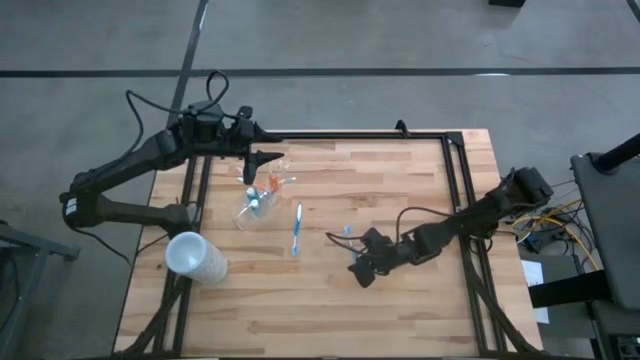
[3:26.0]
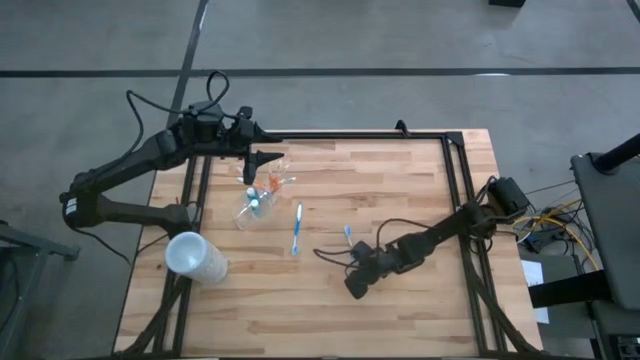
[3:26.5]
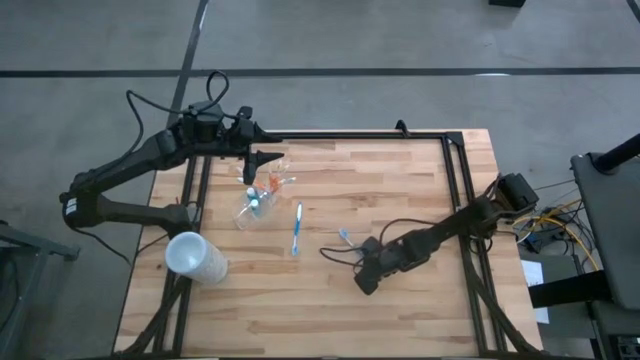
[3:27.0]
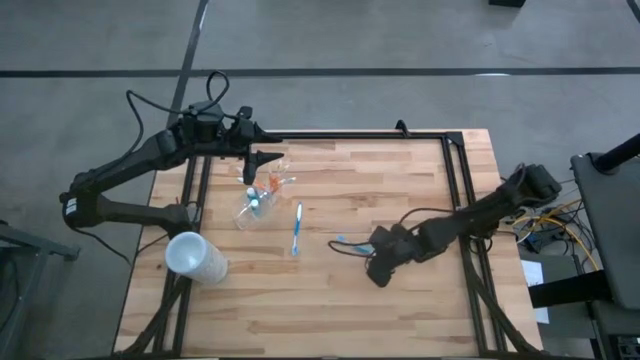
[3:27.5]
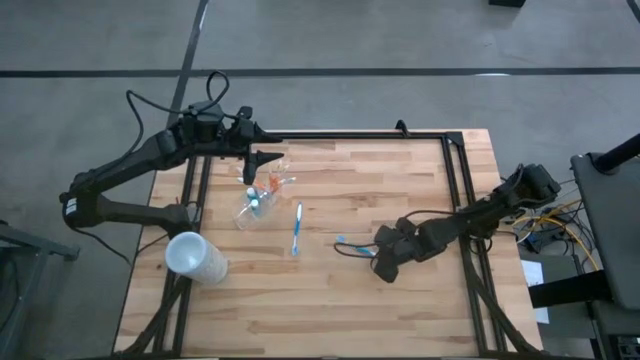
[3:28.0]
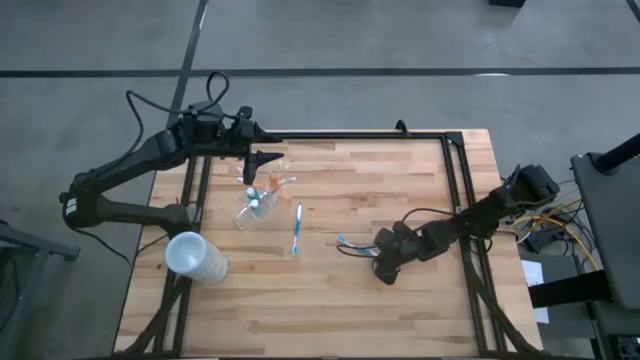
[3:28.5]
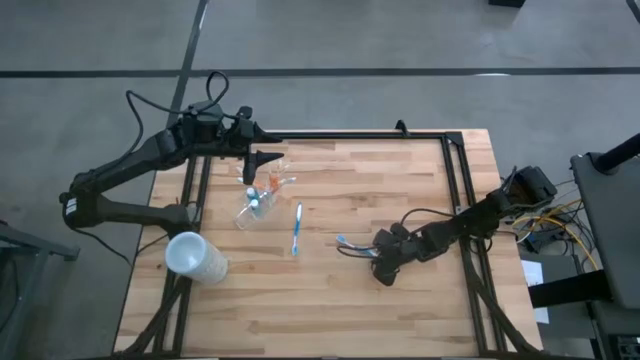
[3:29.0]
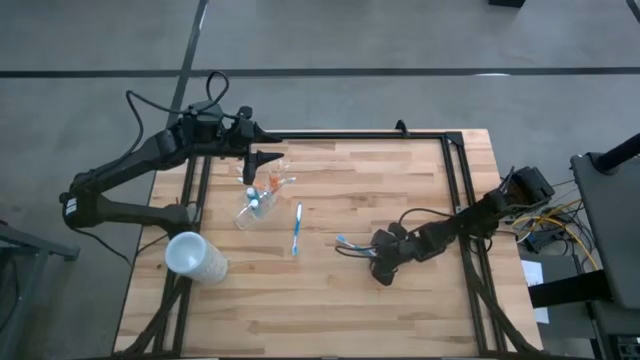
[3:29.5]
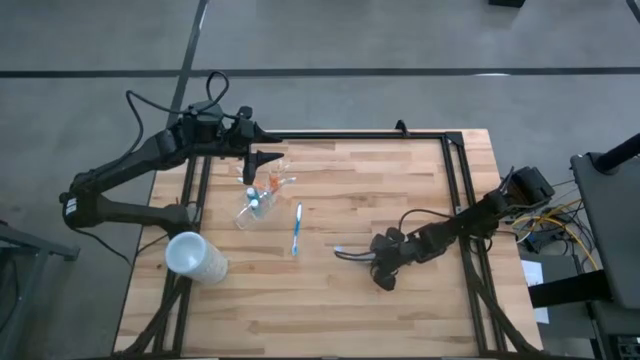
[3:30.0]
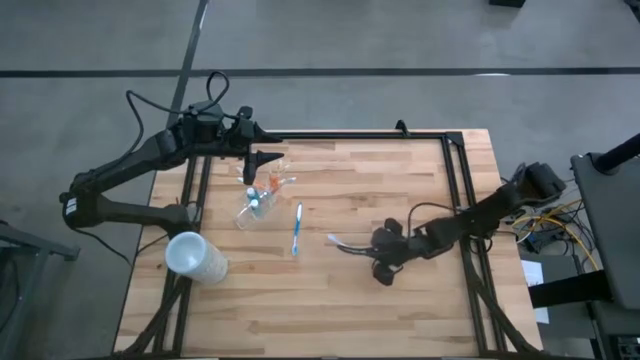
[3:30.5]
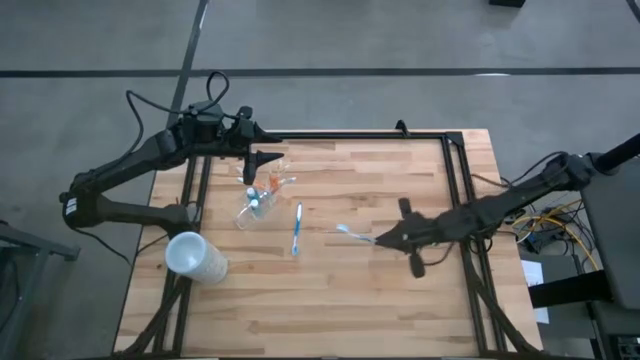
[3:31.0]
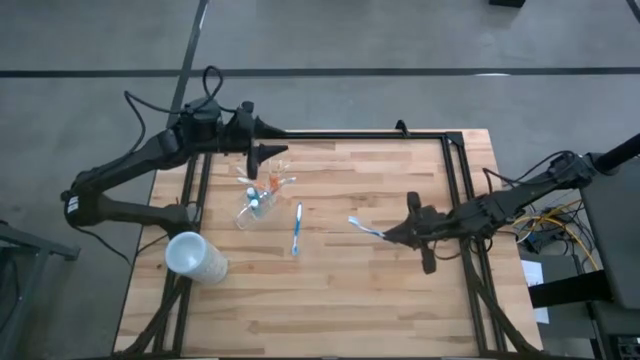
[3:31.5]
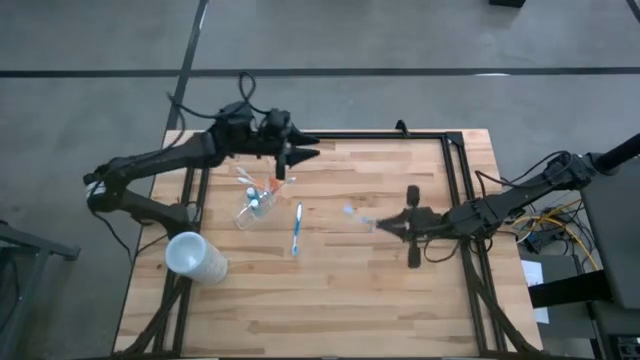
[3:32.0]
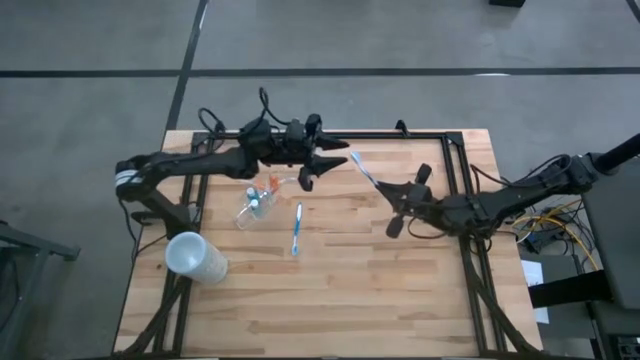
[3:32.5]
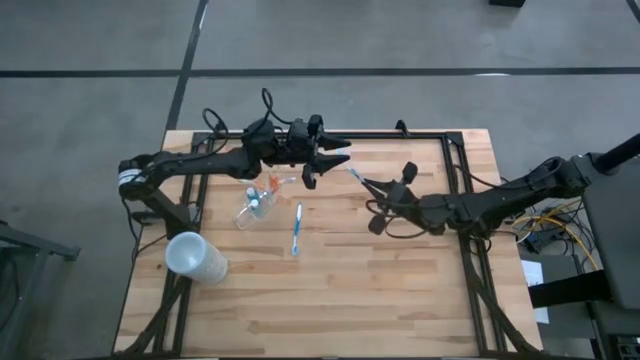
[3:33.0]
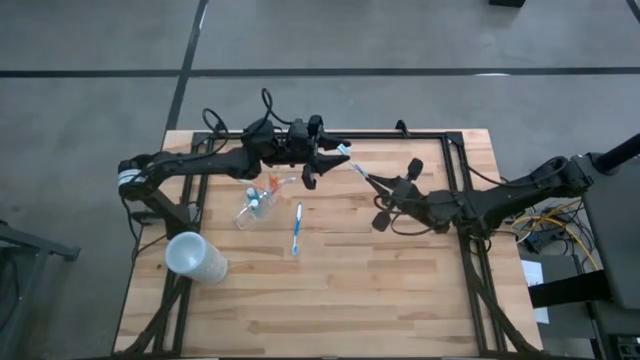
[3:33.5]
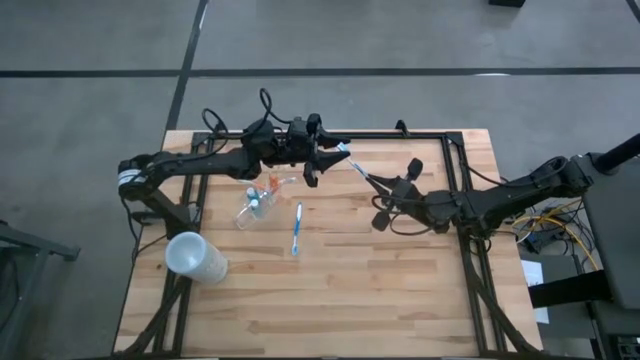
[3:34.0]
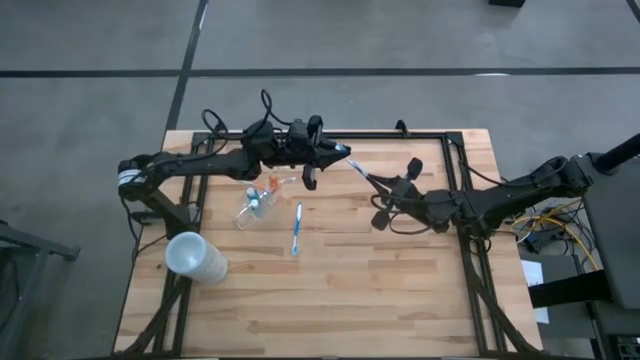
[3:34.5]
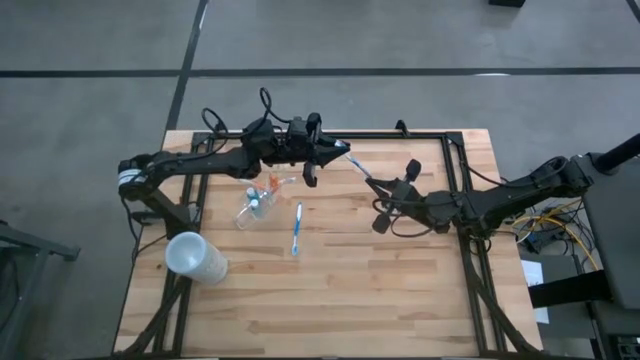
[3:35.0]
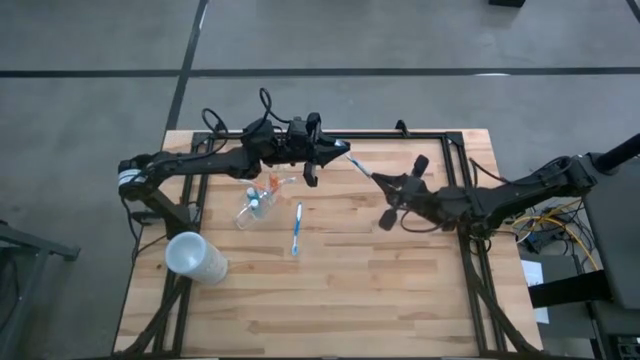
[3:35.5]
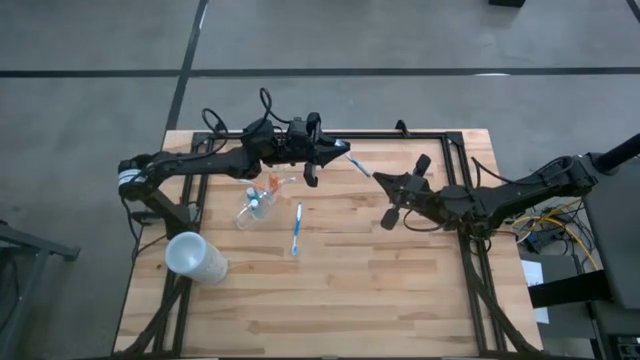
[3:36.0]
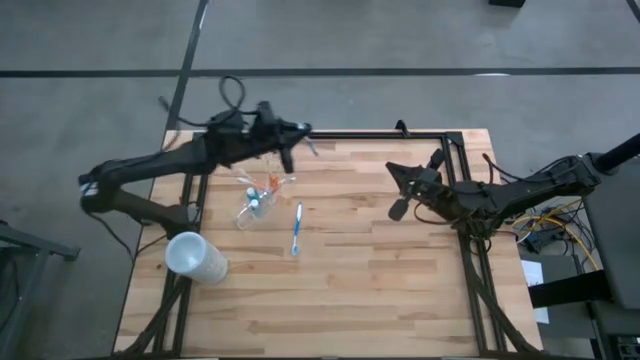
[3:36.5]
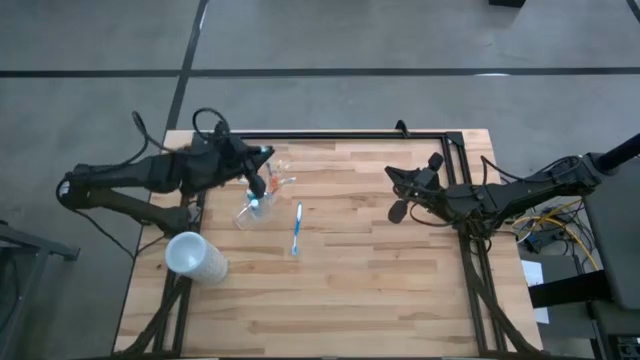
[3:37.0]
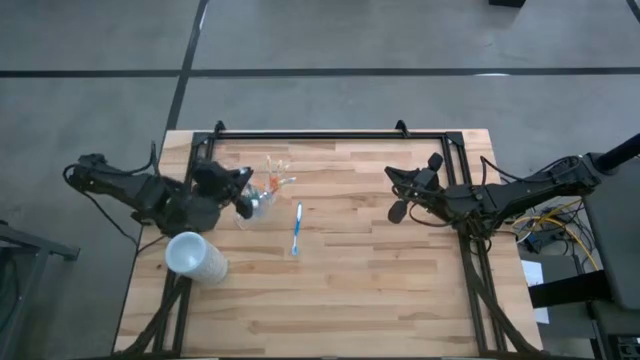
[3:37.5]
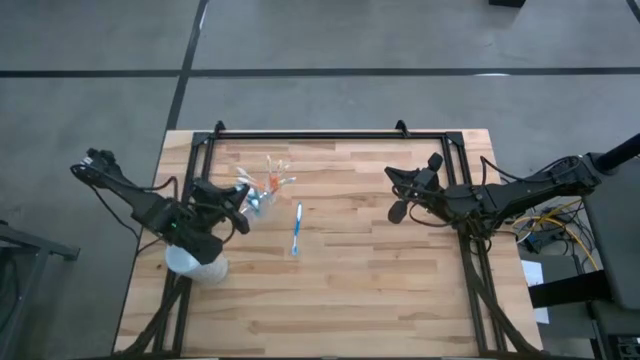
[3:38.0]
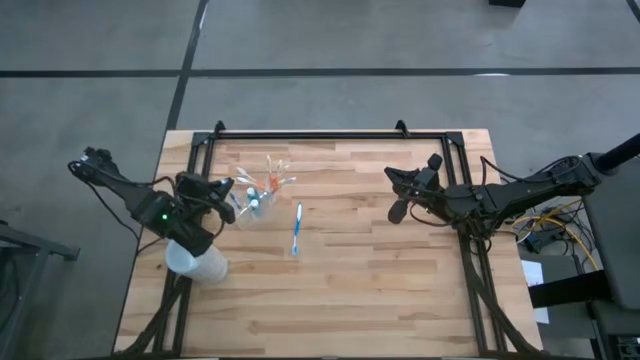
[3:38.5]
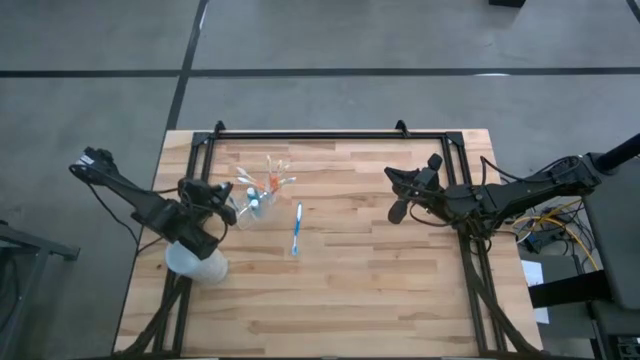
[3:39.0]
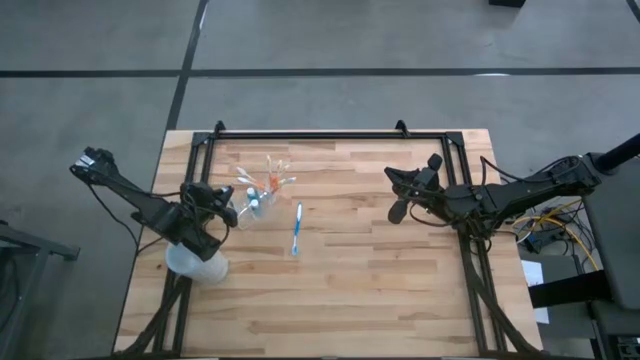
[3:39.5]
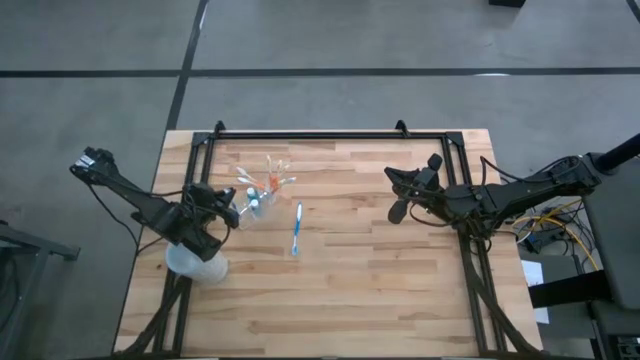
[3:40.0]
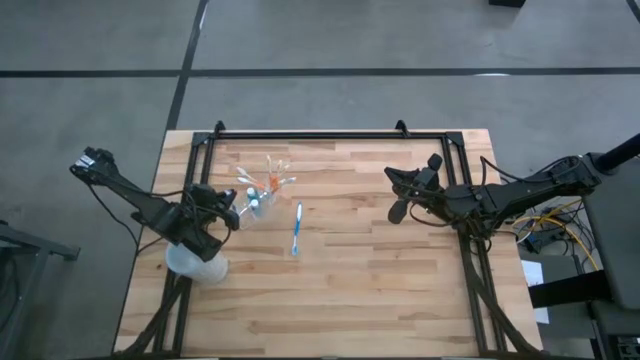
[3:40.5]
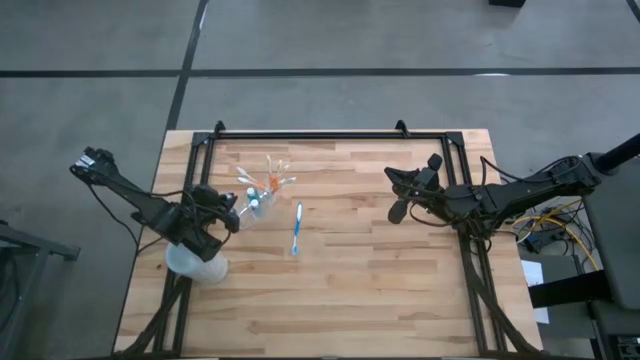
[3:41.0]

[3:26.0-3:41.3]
Task: Pick & Place toothbrushing station
Put the top blue toothbrush into the transparent organizer

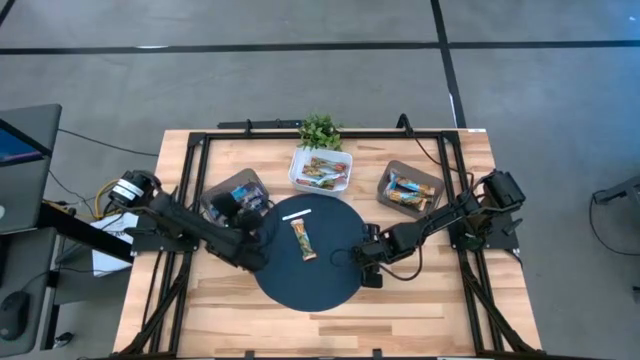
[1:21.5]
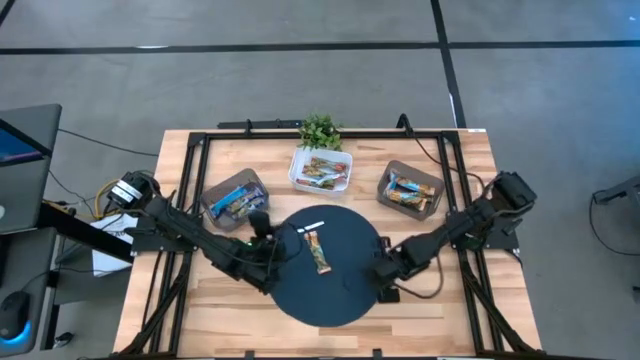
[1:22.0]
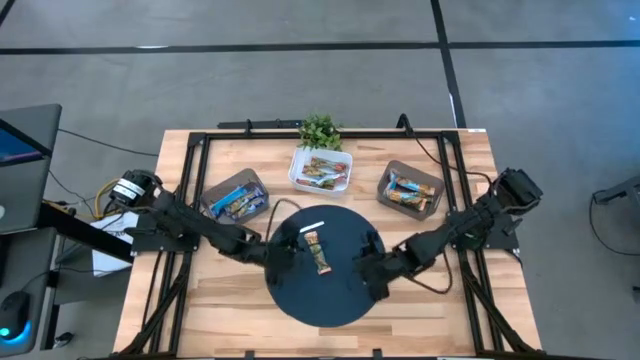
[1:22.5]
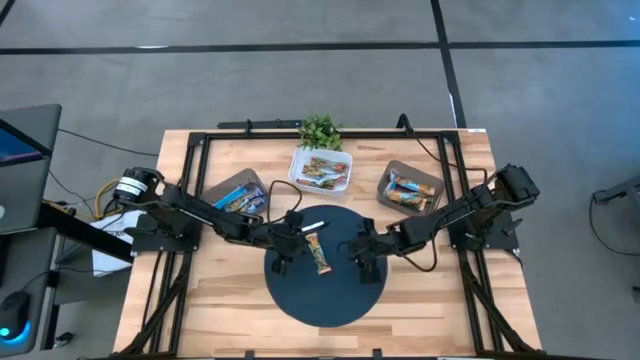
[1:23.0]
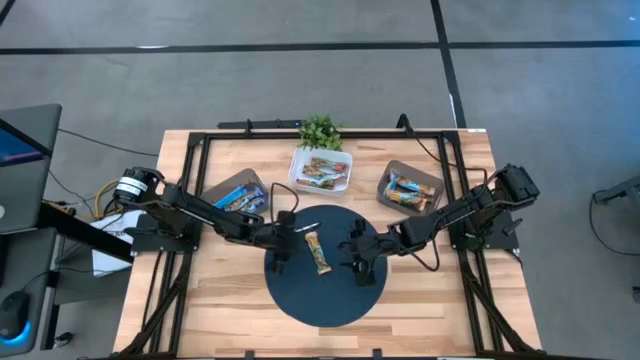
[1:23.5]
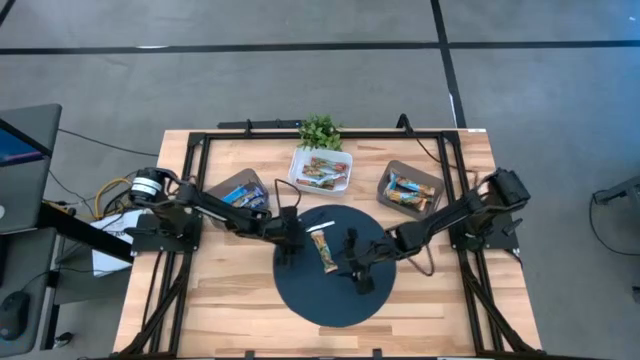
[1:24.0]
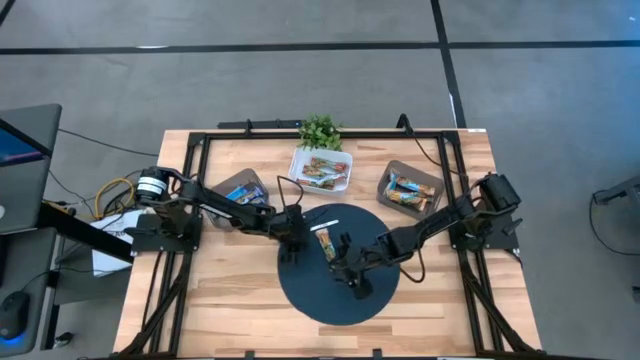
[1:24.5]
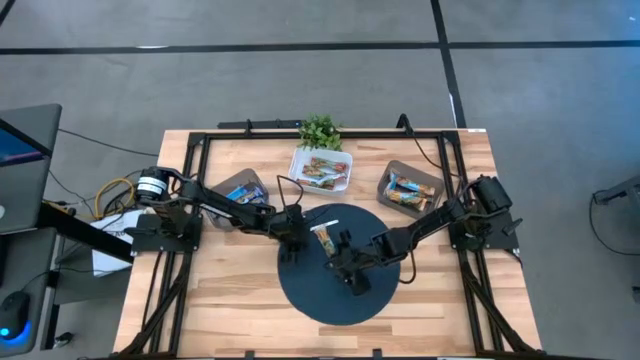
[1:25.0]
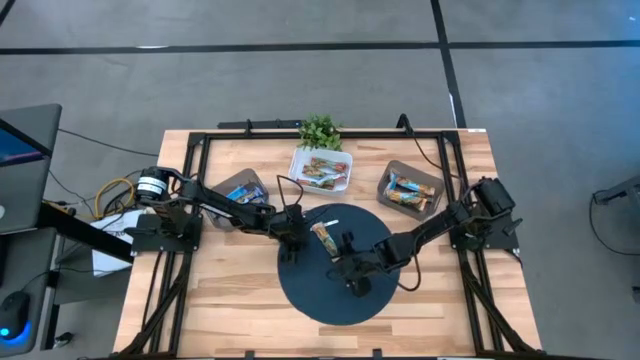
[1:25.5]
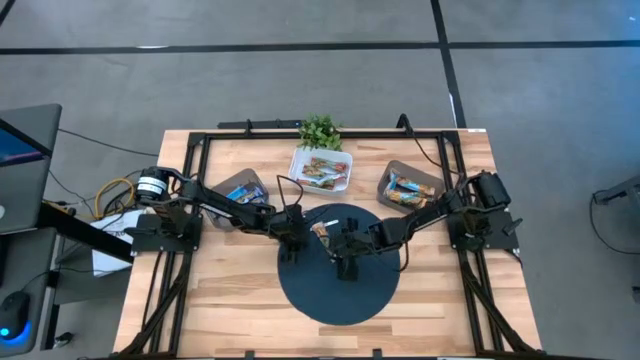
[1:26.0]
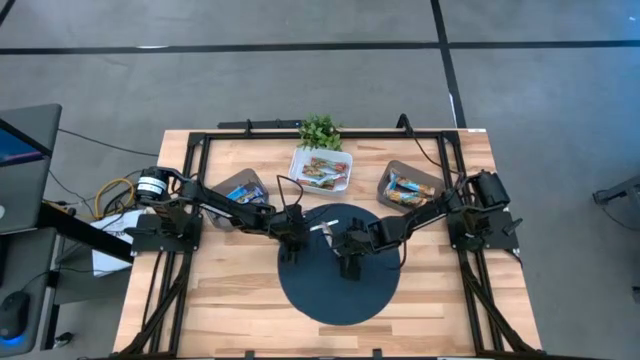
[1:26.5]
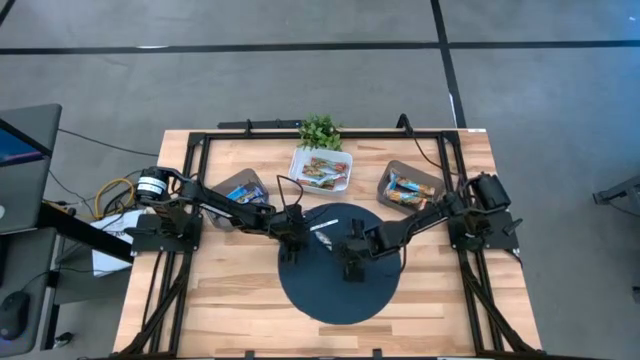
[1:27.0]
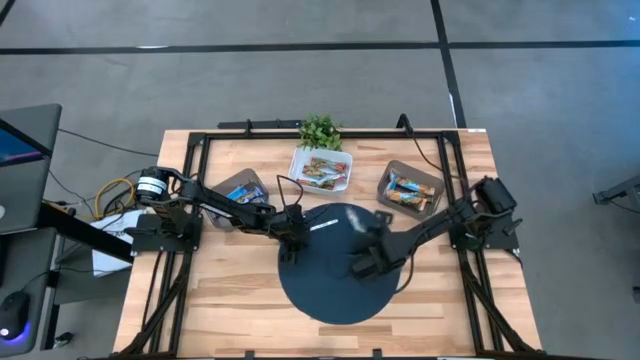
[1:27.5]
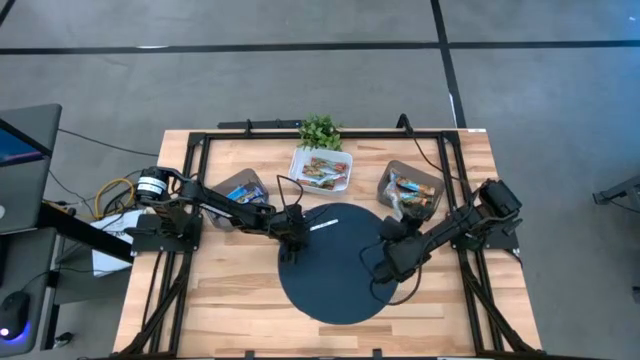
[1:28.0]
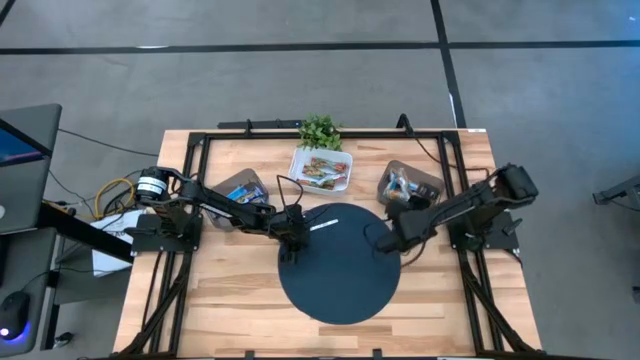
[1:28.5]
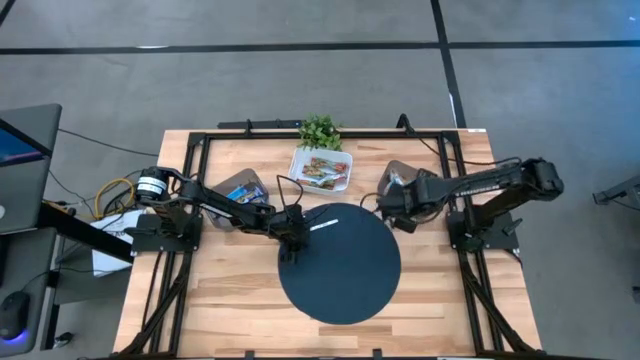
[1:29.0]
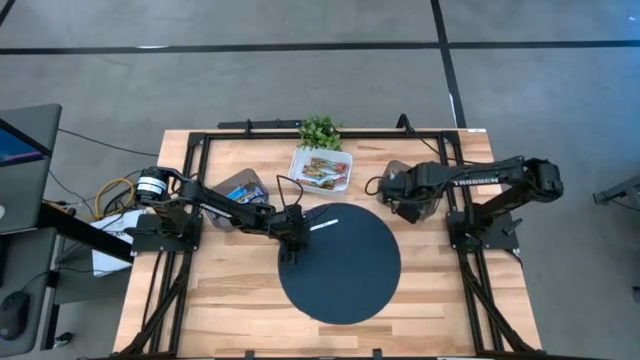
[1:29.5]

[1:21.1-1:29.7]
Task: Pick and place Granola Bars by type
Put the yellow granola bar into the right black bin
